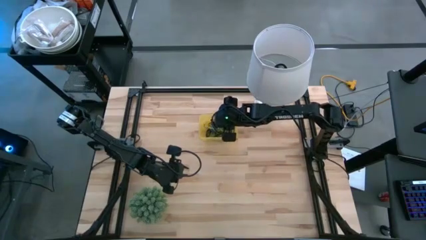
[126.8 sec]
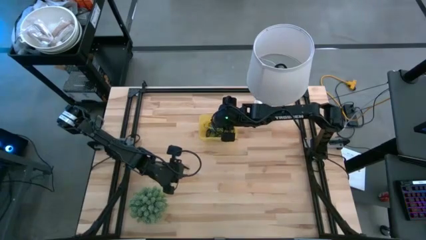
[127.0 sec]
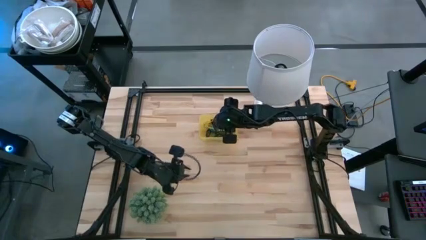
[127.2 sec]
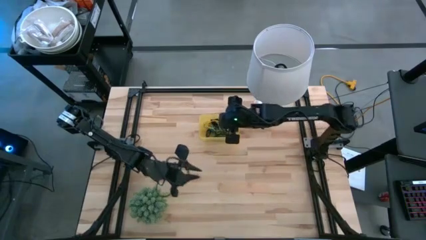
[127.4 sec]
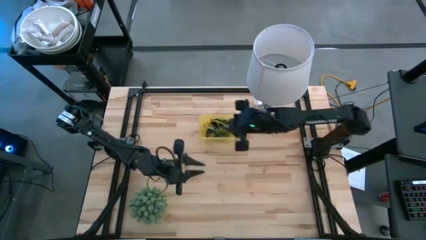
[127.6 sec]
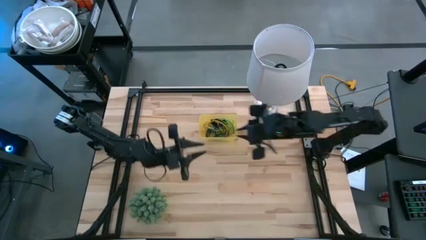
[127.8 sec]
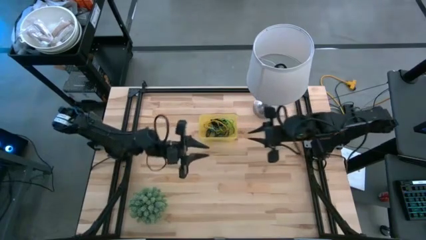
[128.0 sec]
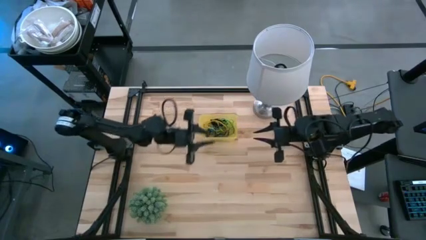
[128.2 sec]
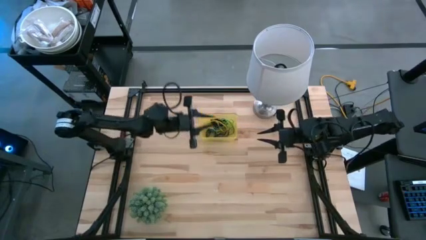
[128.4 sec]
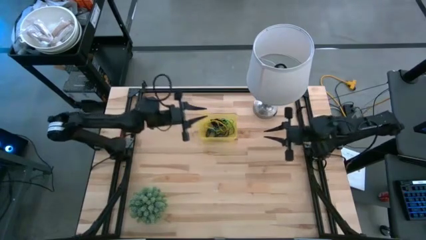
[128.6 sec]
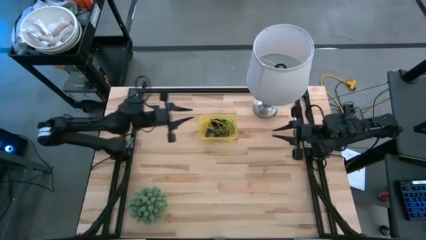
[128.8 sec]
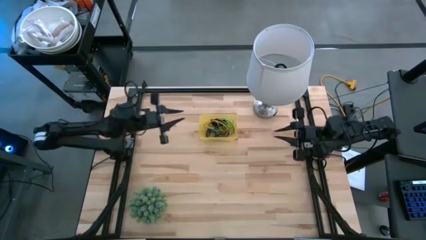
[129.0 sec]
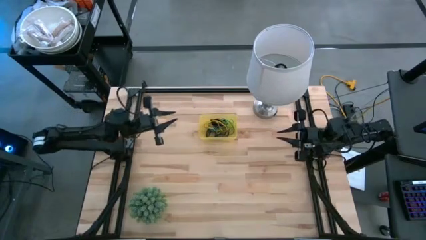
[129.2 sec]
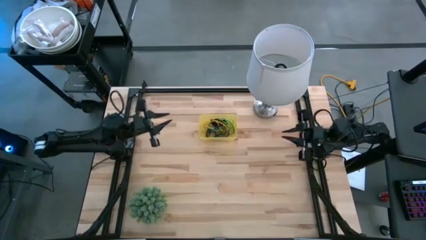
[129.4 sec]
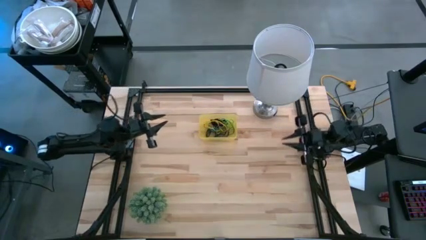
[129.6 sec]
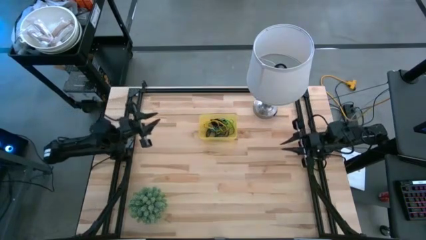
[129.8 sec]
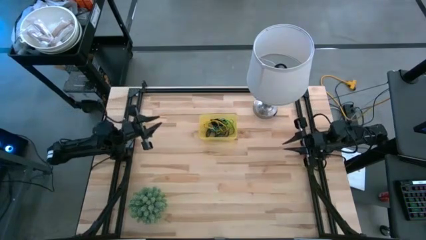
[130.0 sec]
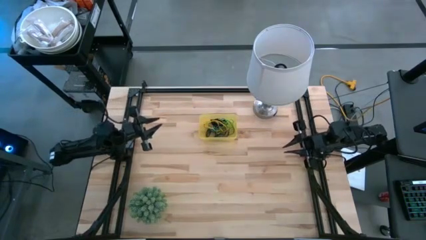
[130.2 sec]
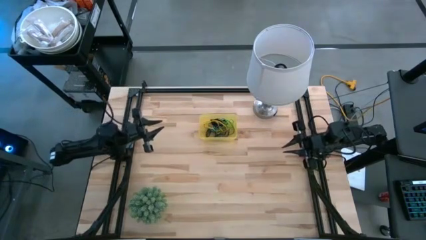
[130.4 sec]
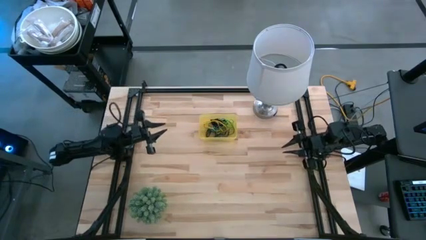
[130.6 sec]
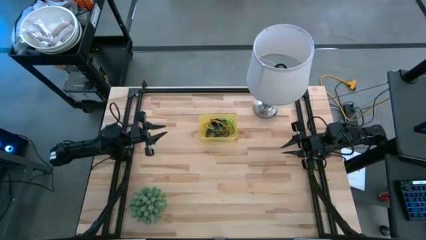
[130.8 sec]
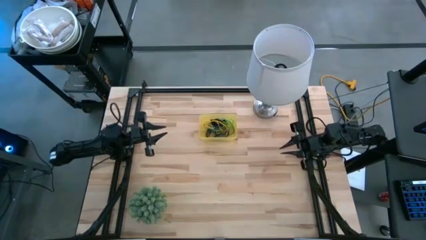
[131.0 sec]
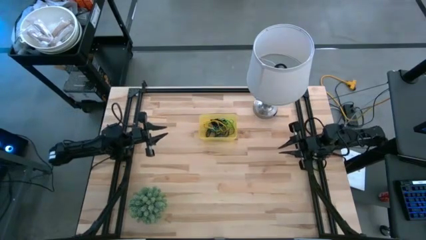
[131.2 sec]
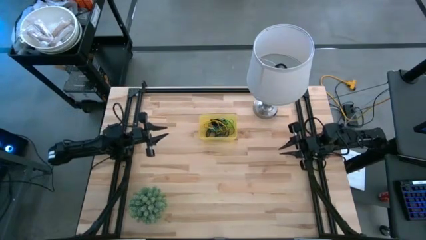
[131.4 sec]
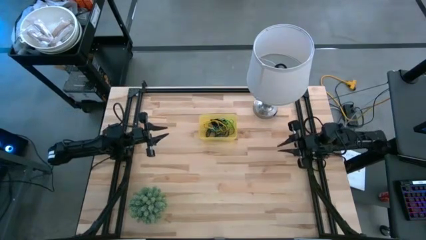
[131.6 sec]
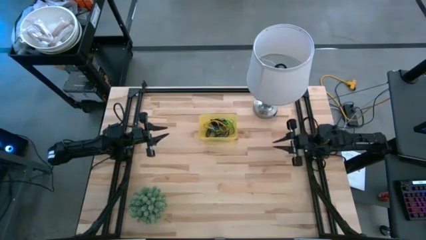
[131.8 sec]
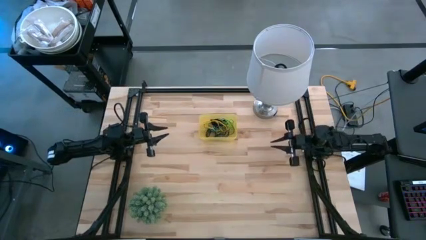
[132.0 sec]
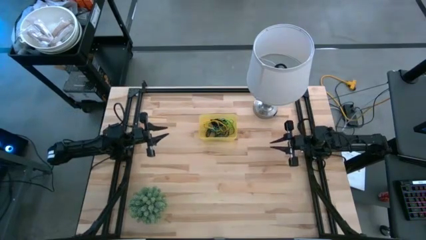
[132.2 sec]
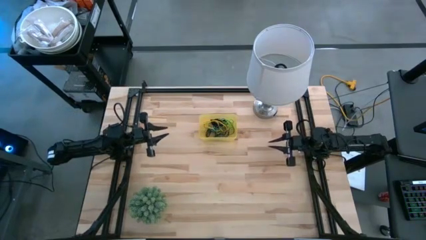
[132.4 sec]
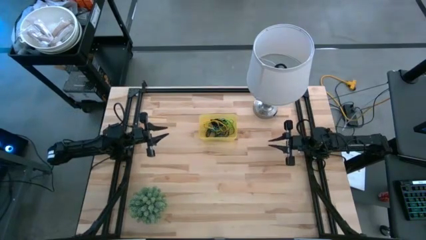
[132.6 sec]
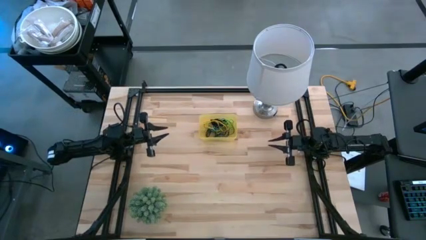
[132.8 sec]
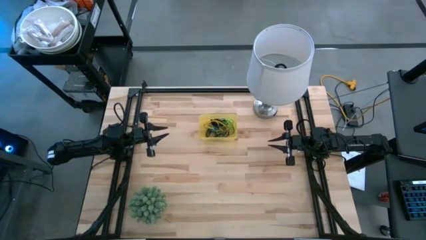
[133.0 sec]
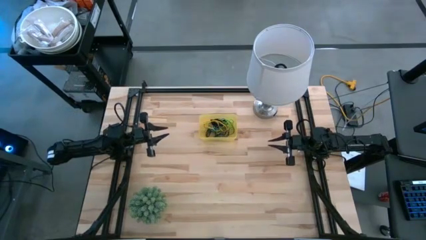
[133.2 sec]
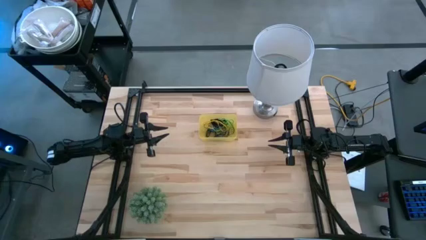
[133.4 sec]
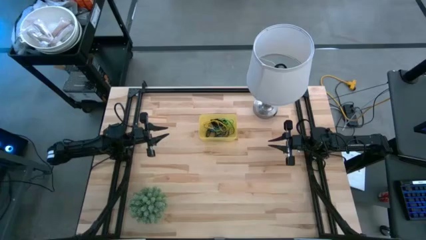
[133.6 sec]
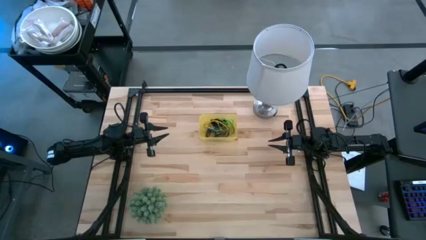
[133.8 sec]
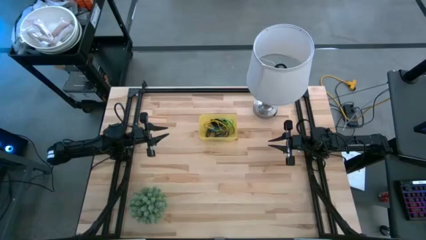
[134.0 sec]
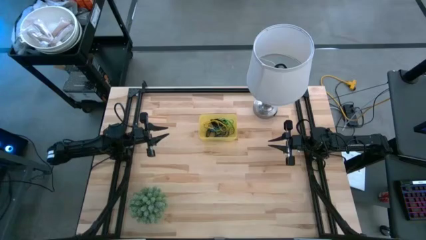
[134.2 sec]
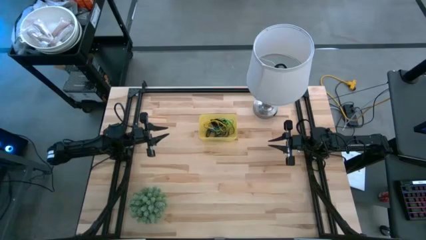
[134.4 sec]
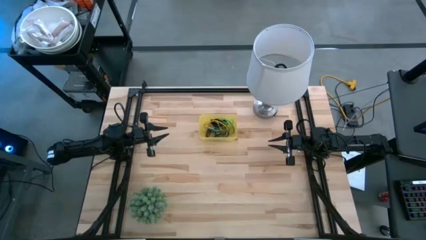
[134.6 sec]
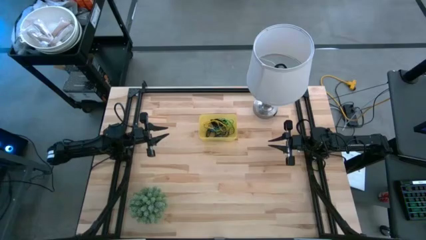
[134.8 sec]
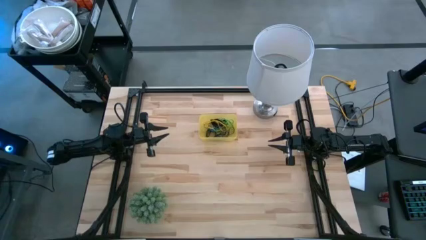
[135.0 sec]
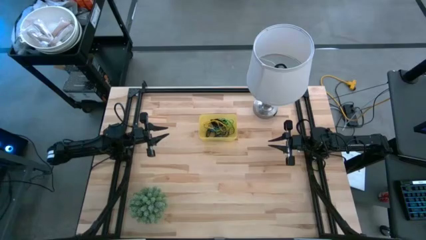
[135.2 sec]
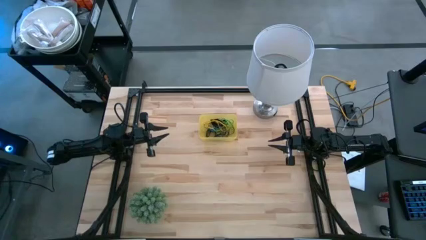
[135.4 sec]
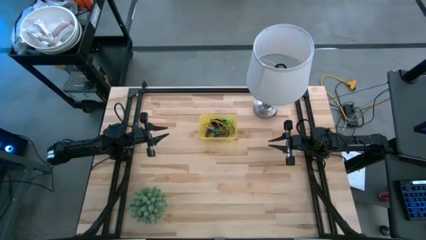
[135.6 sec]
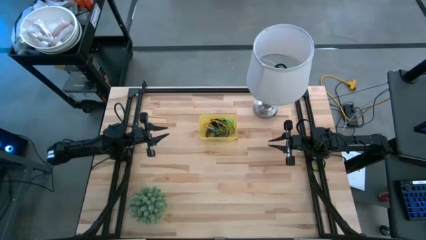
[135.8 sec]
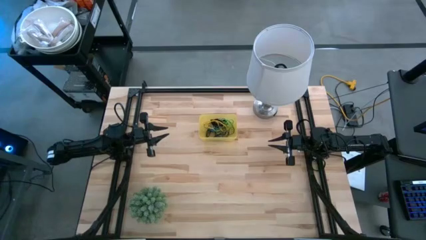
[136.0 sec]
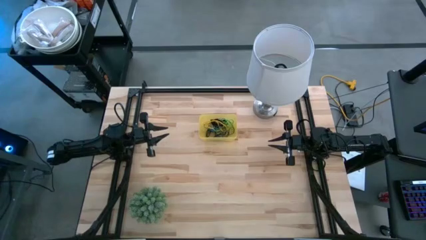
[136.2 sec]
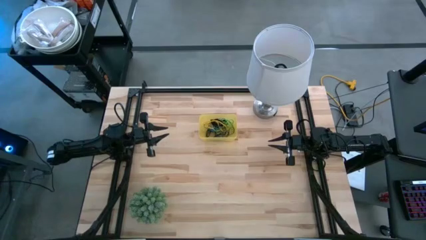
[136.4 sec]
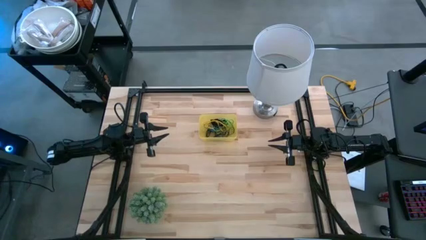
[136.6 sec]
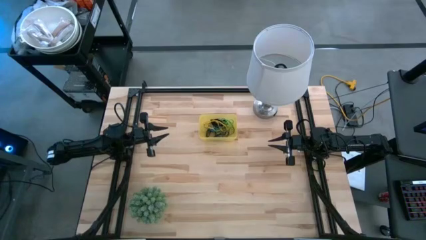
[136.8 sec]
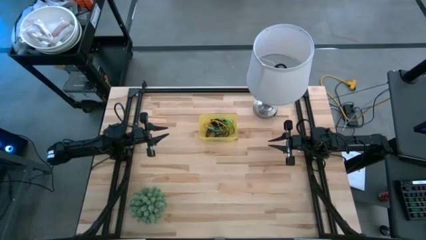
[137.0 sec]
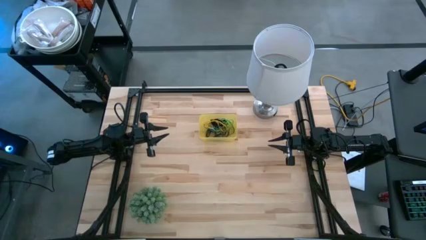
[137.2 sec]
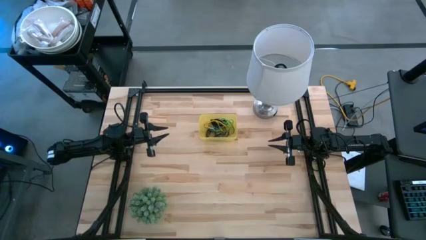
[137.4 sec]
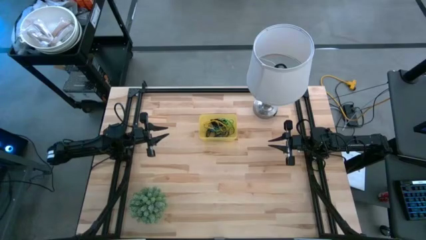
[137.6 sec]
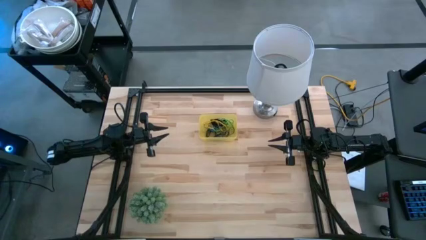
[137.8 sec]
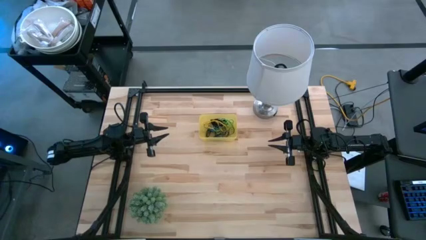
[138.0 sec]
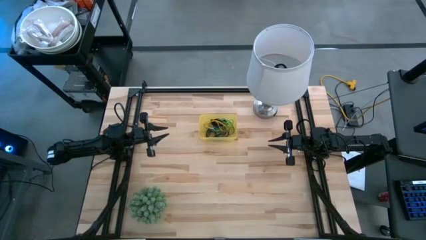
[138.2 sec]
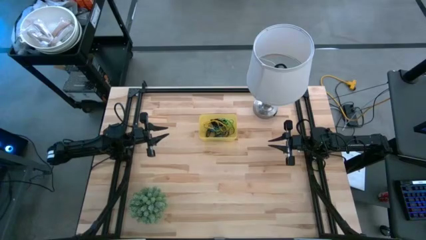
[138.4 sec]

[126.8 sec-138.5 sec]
Task: Pick and place rubber bands into bin
Return to Home Position
